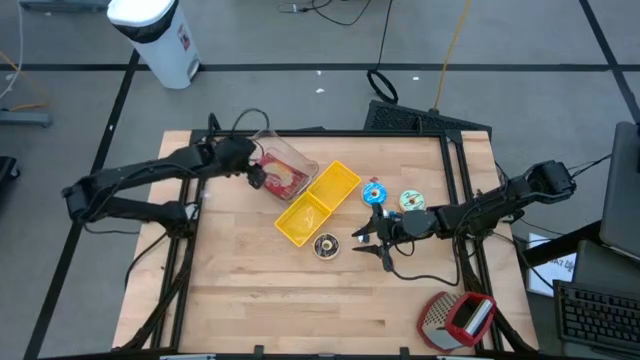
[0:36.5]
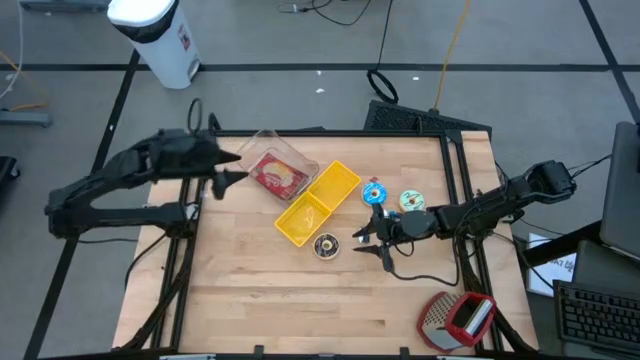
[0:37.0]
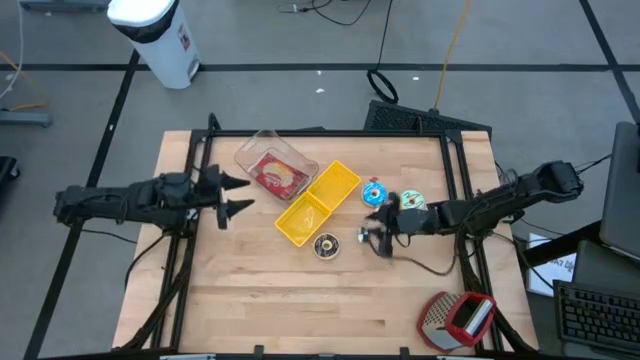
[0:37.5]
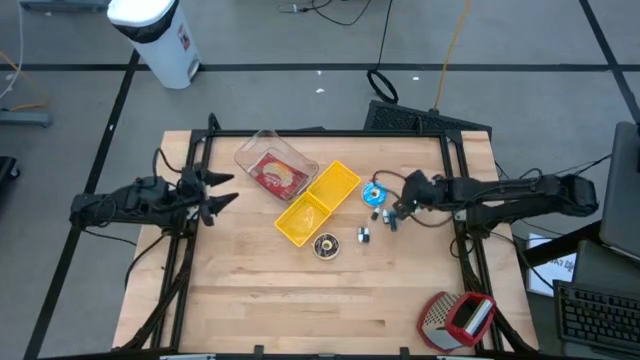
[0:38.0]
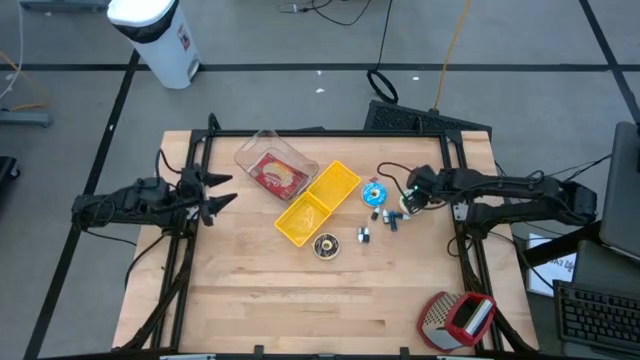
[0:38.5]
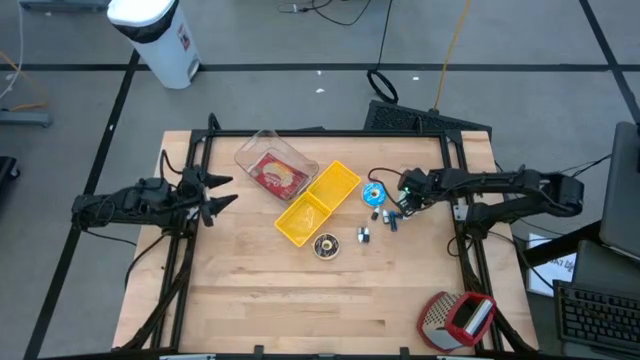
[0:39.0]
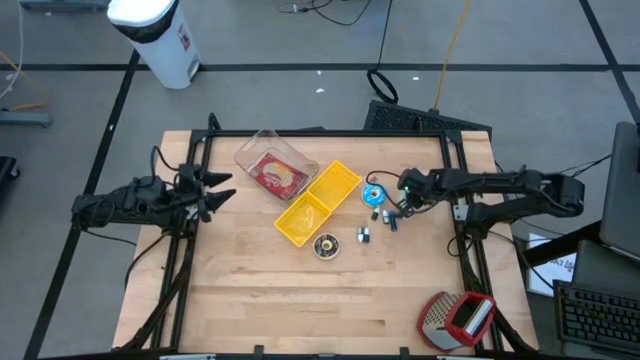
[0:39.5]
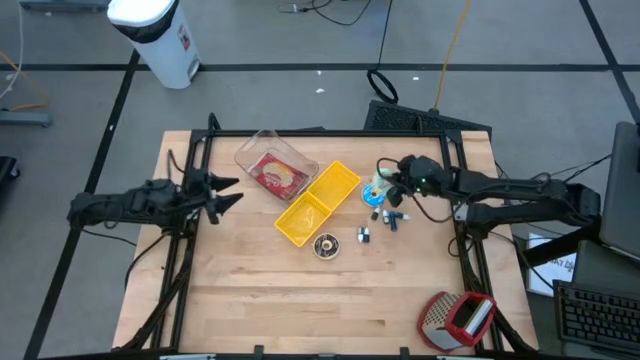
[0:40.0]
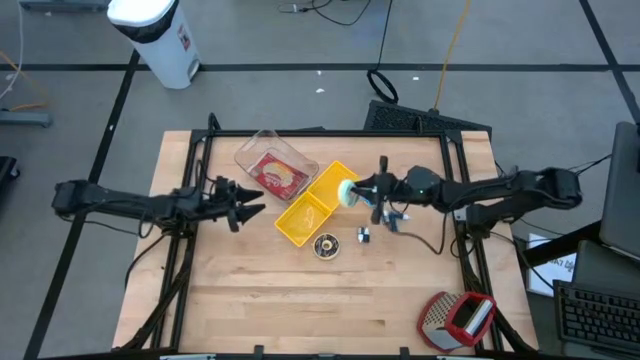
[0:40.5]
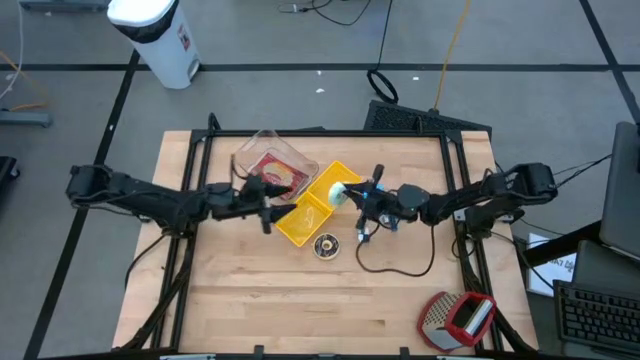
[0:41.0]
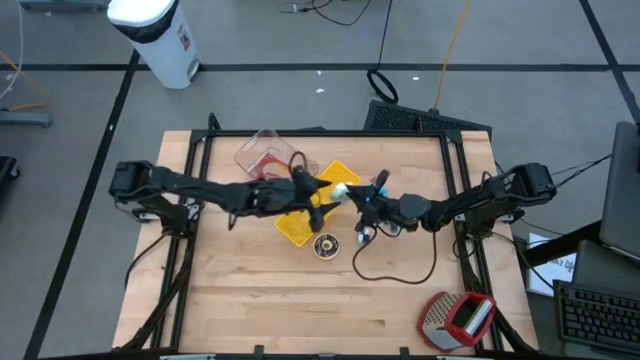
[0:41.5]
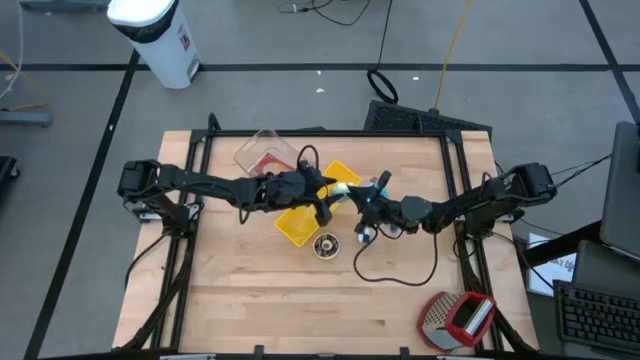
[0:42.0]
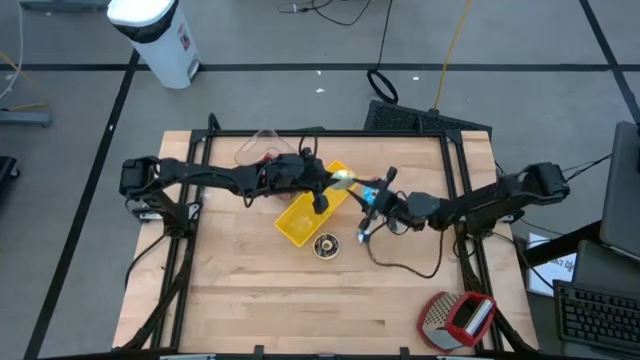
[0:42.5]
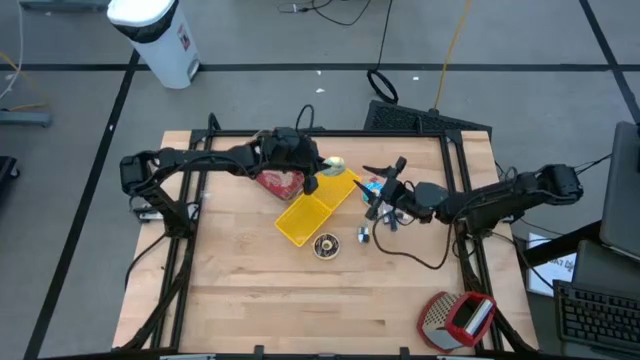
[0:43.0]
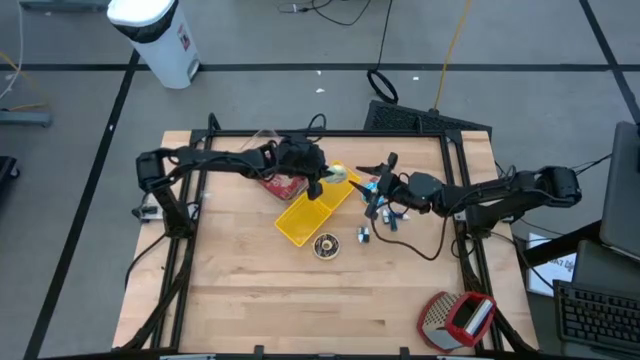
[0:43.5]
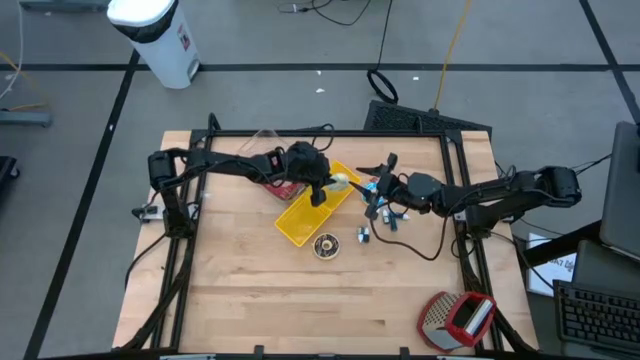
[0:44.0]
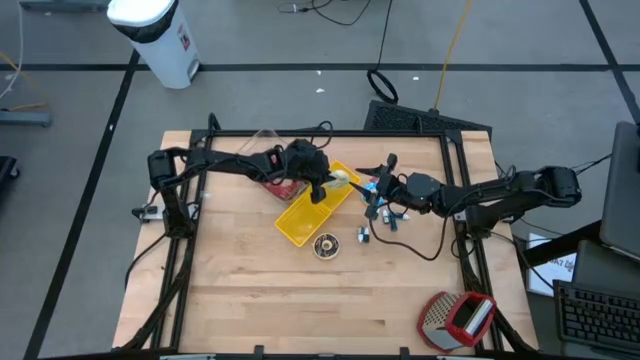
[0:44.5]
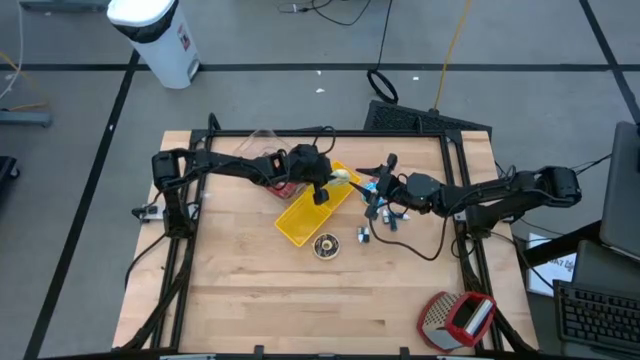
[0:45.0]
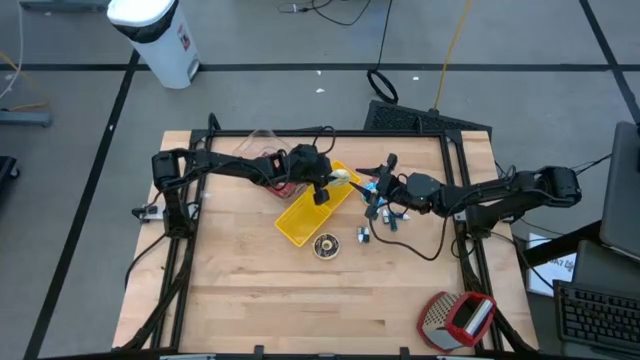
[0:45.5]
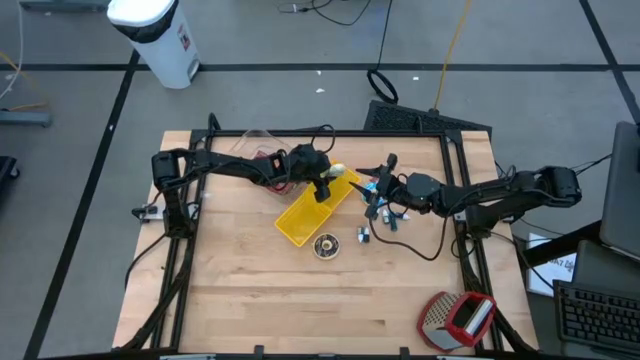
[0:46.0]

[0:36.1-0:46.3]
Put the light blue donut into the top yellow bin

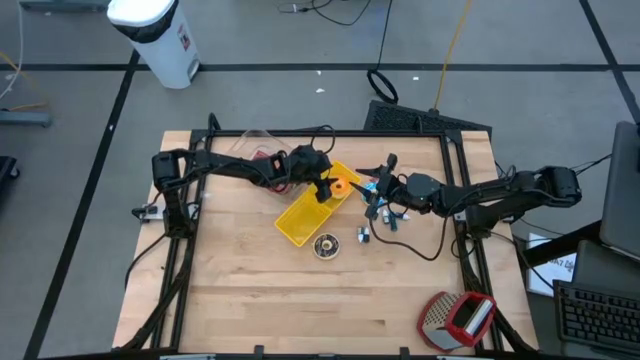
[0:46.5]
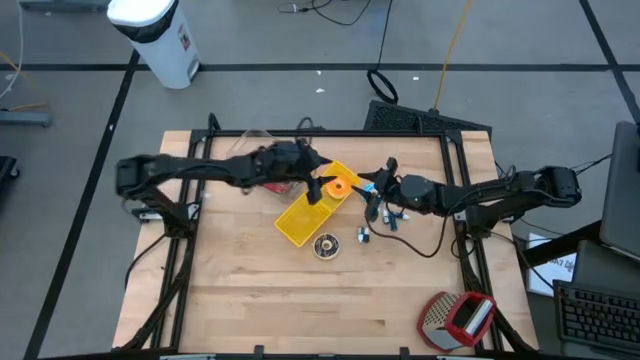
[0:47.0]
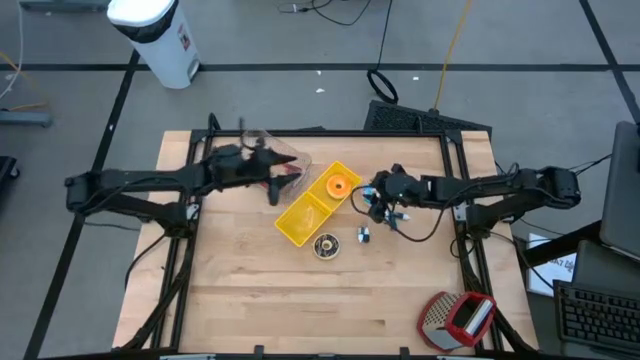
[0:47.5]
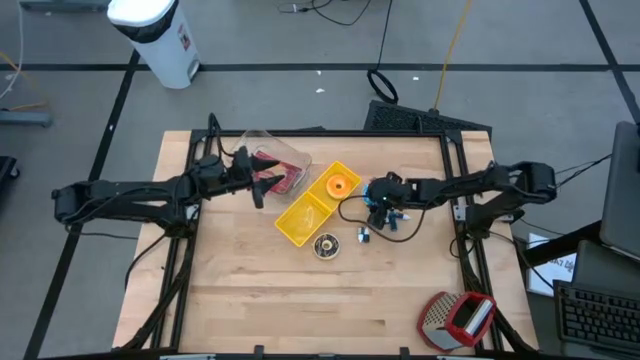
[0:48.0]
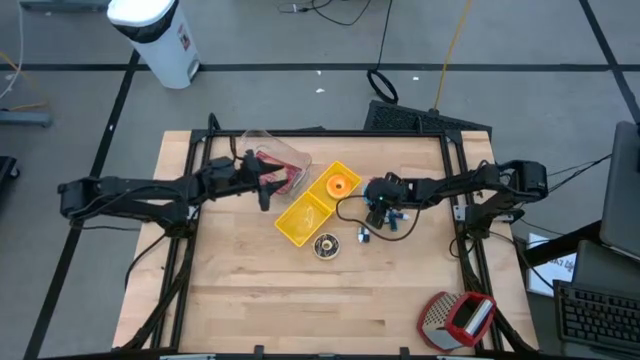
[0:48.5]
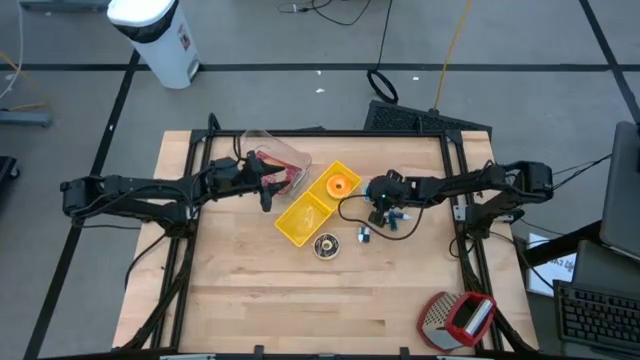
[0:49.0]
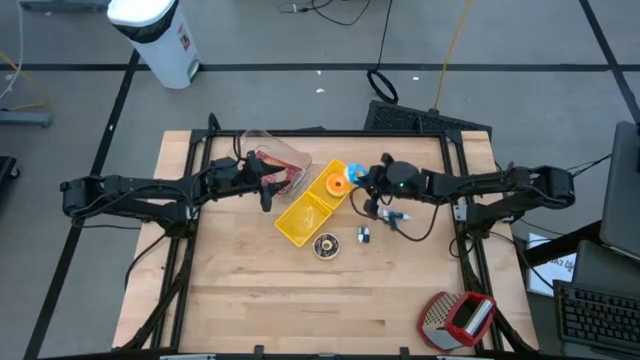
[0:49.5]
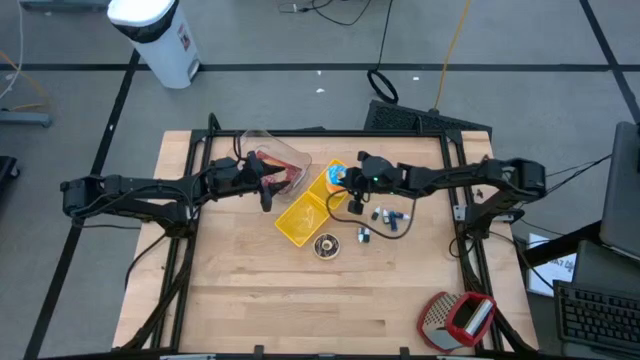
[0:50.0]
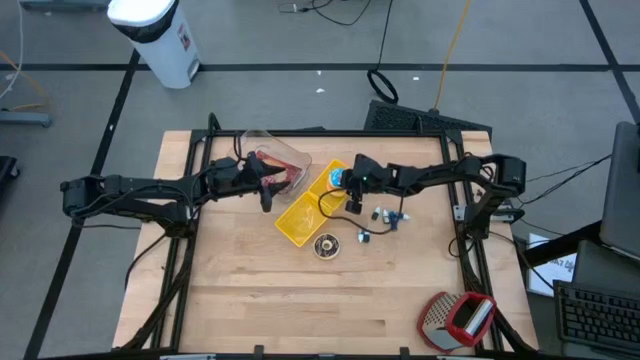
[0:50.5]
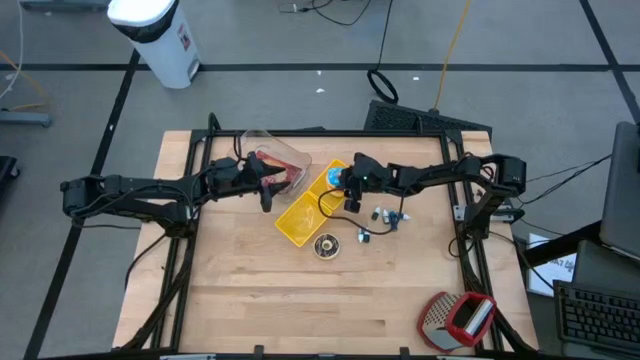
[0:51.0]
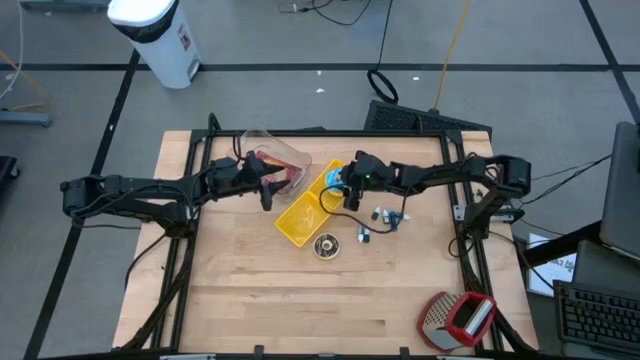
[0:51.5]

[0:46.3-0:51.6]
Put the blue donut into the top yellow bin

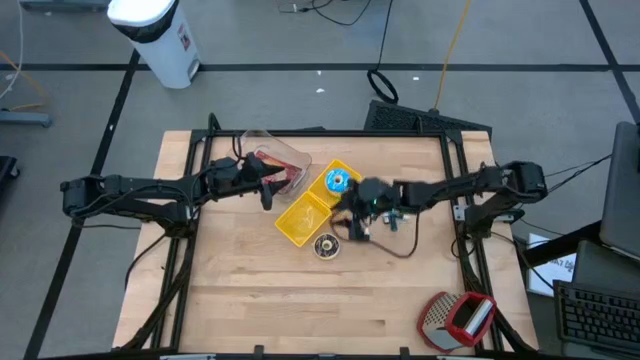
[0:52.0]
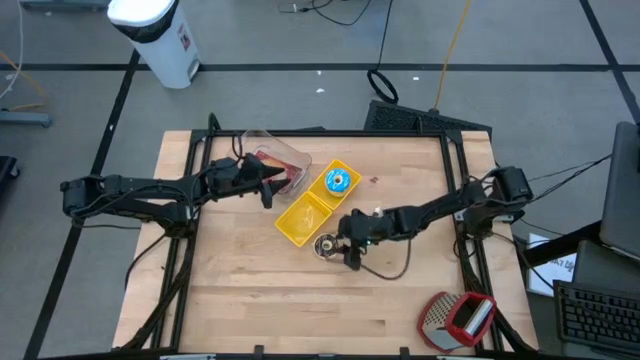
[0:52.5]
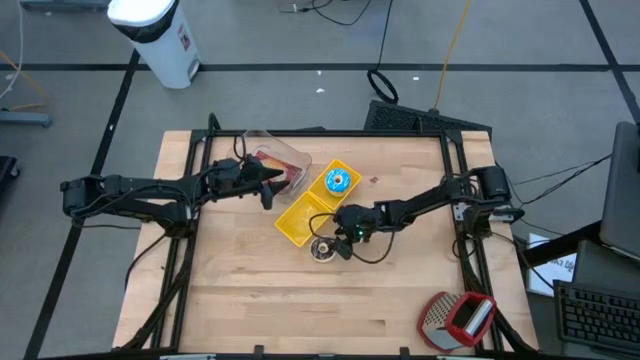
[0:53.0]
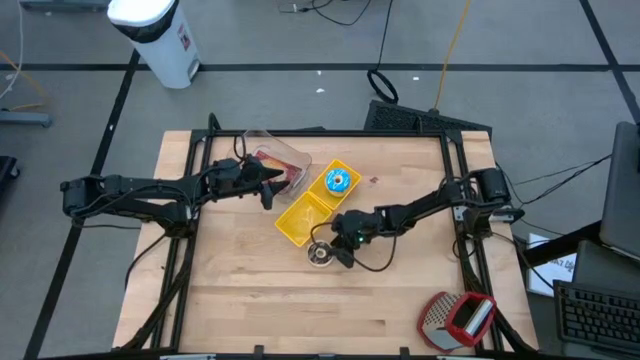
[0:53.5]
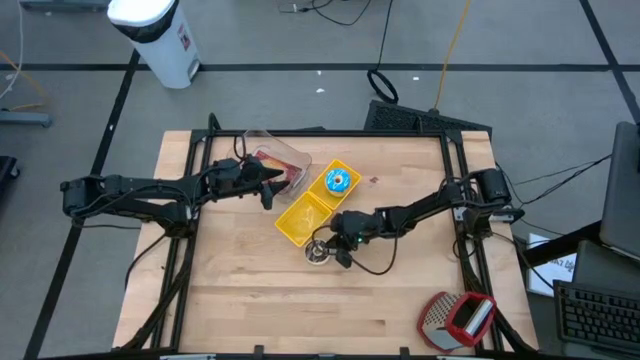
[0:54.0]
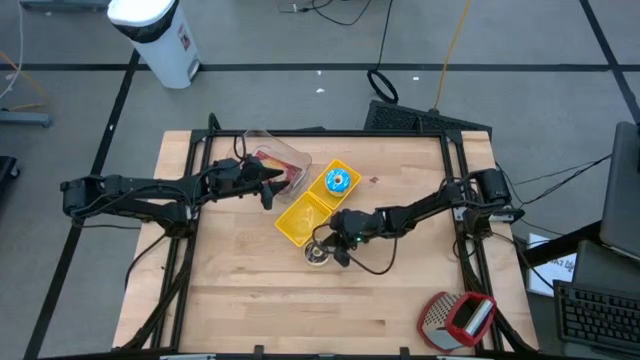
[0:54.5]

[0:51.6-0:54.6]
Put the black donut into the top yellow bin

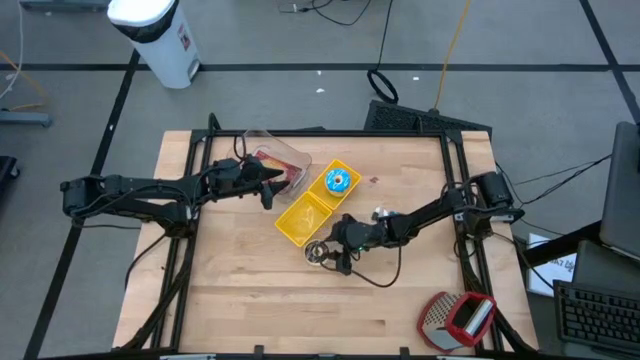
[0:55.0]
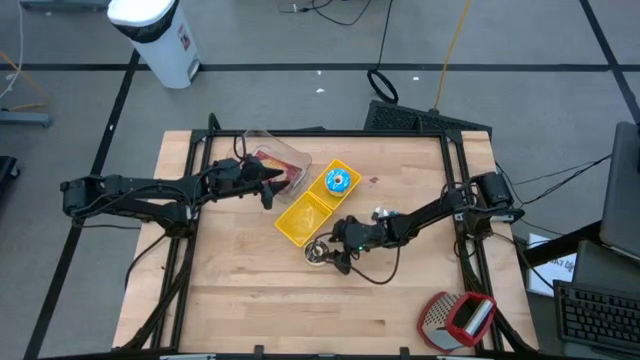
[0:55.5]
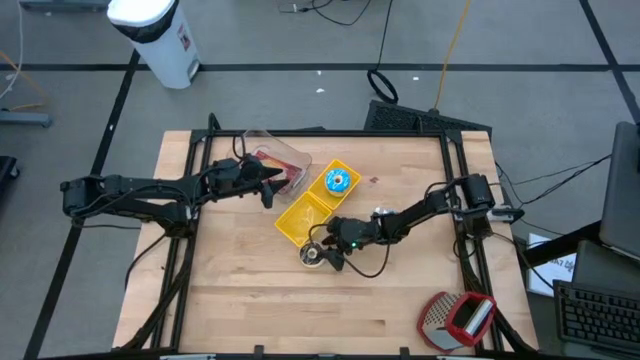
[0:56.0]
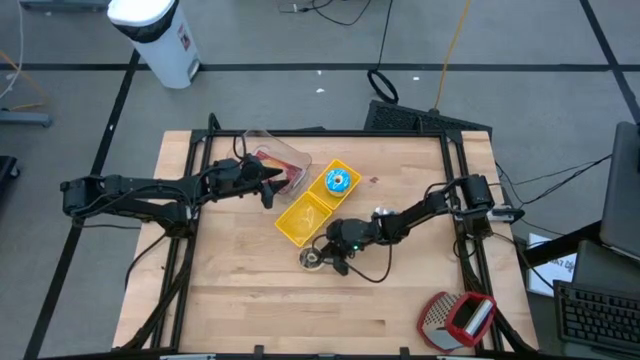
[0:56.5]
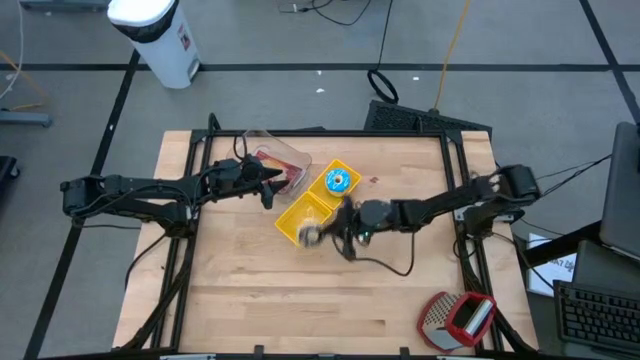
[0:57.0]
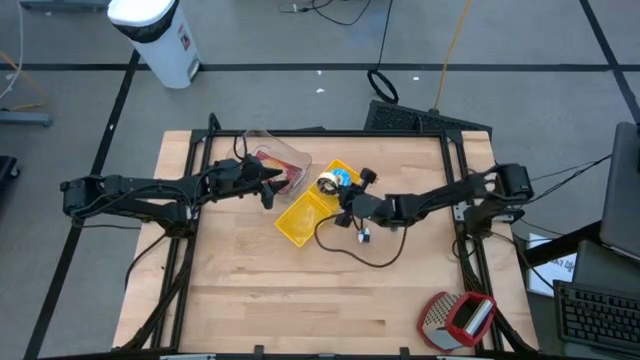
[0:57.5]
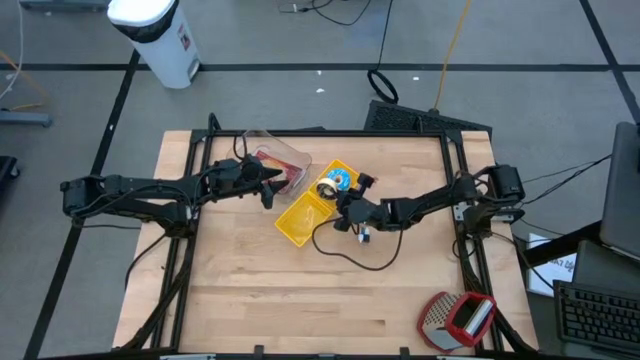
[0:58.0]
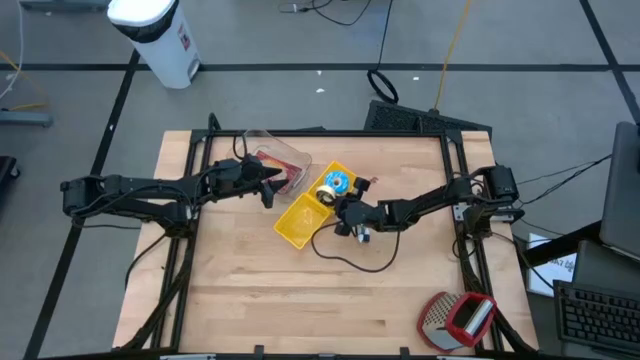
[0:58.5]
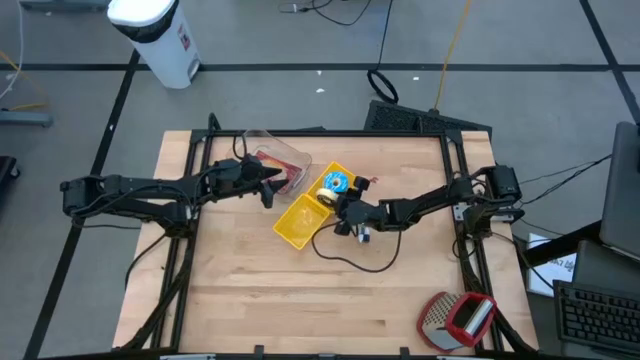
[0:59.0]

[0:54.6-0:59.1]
Put the black donut into the top yellow bin
